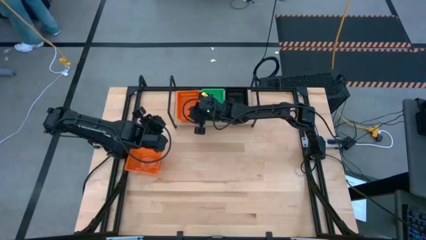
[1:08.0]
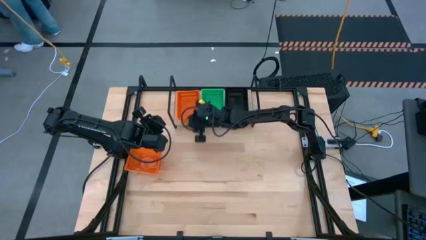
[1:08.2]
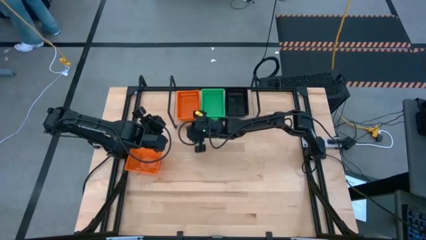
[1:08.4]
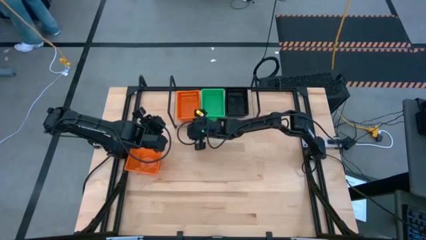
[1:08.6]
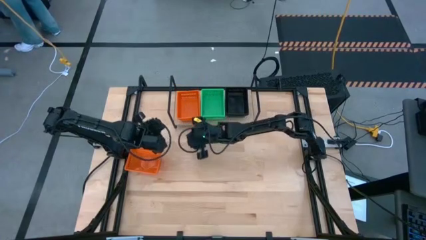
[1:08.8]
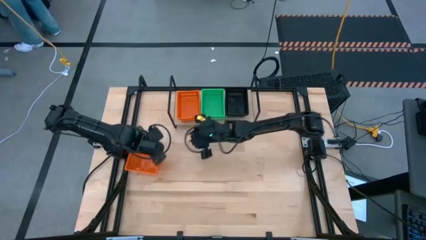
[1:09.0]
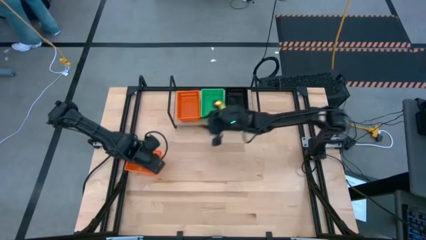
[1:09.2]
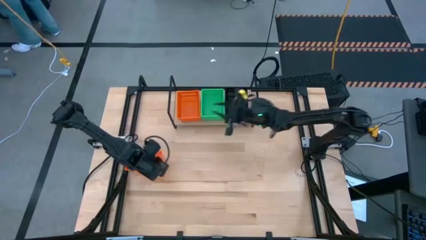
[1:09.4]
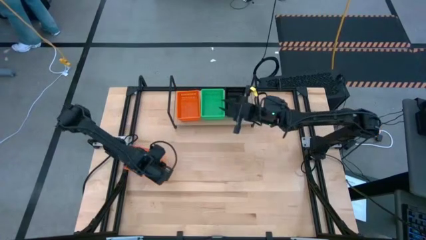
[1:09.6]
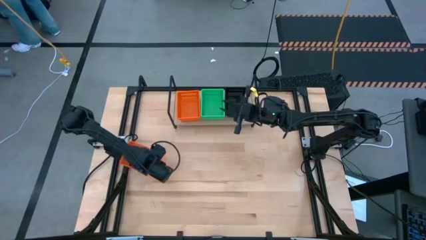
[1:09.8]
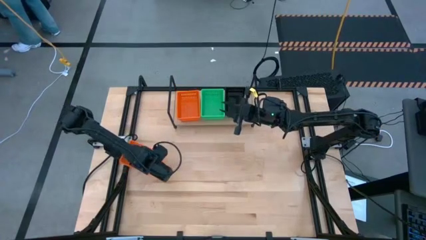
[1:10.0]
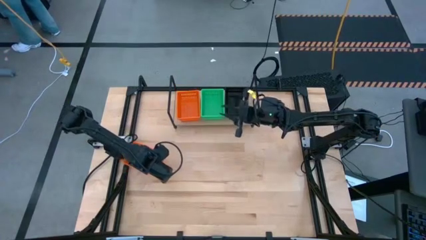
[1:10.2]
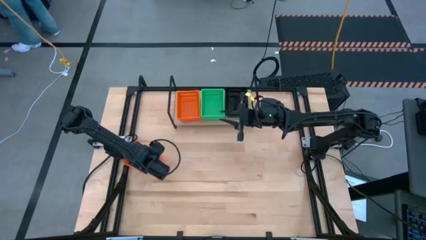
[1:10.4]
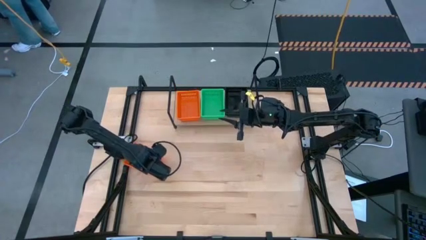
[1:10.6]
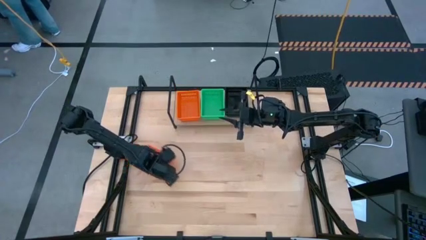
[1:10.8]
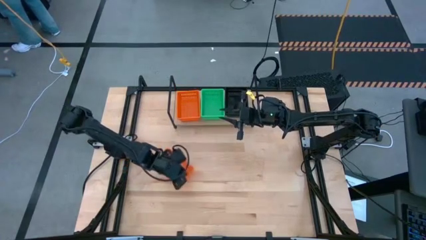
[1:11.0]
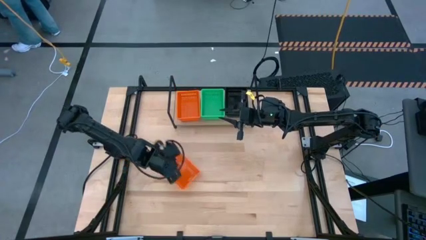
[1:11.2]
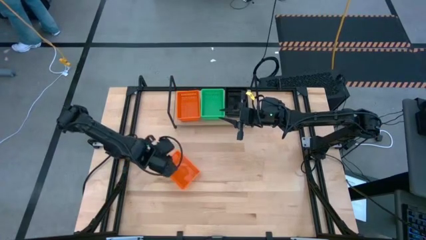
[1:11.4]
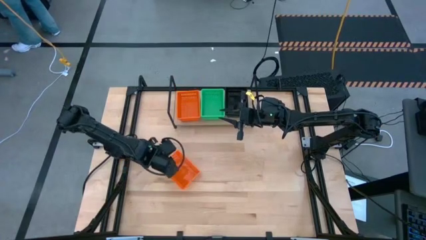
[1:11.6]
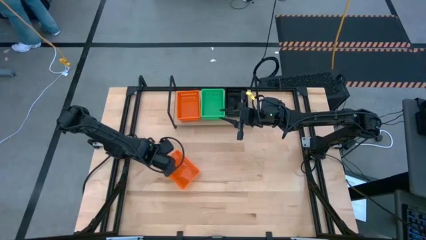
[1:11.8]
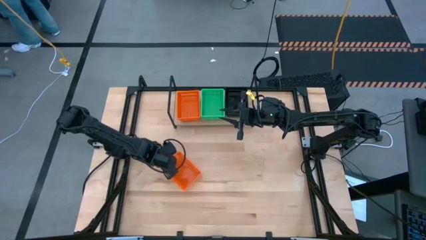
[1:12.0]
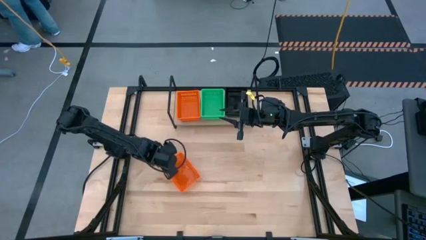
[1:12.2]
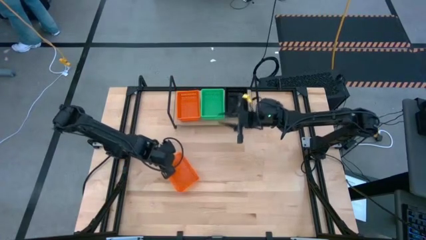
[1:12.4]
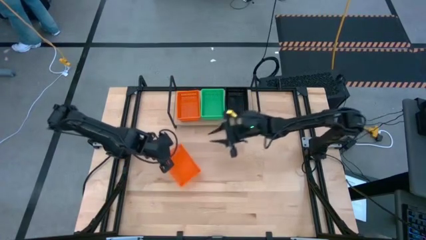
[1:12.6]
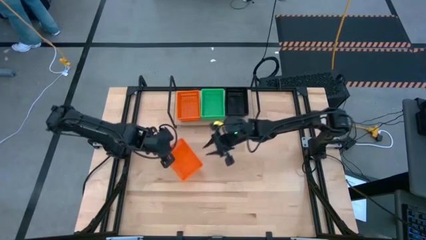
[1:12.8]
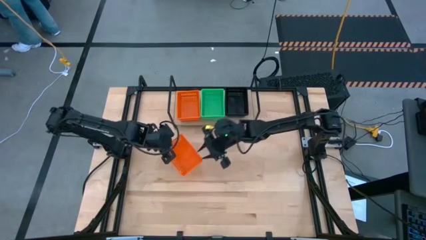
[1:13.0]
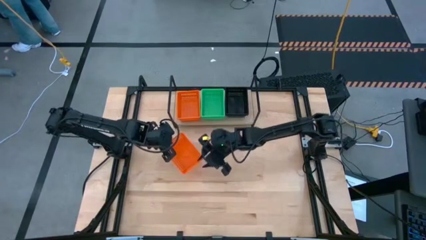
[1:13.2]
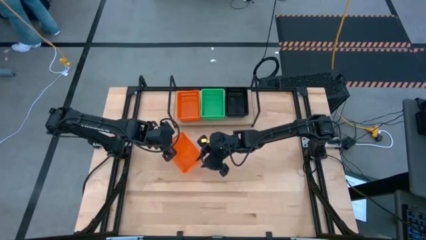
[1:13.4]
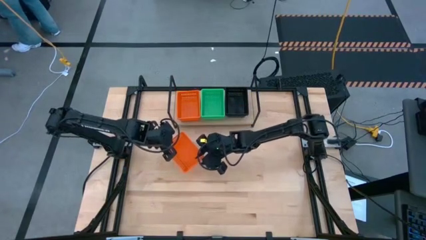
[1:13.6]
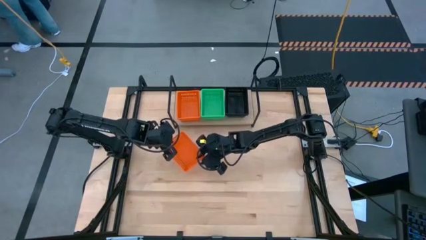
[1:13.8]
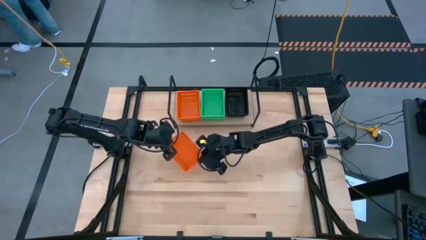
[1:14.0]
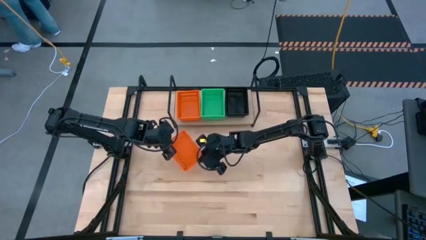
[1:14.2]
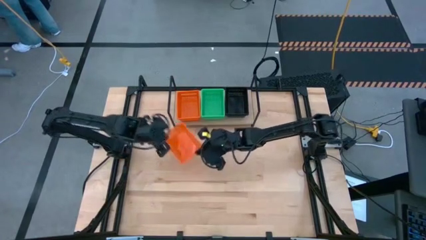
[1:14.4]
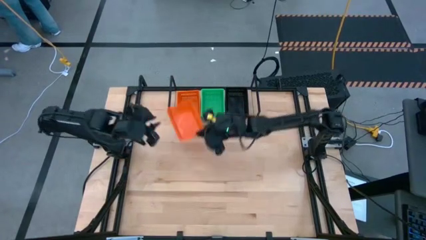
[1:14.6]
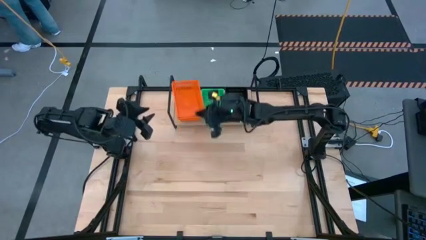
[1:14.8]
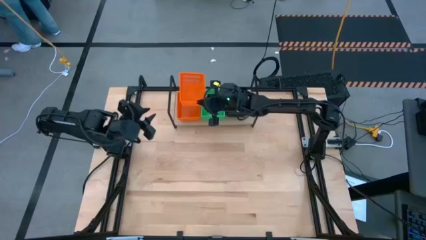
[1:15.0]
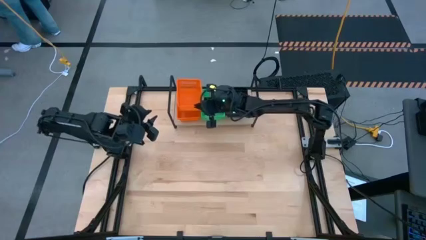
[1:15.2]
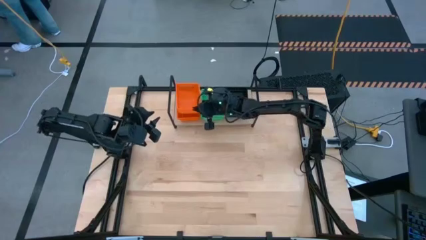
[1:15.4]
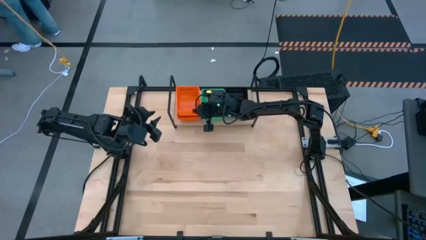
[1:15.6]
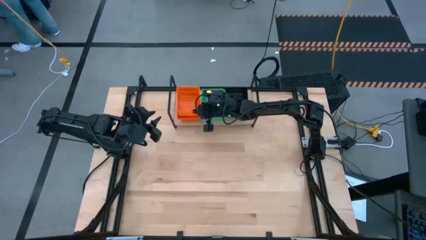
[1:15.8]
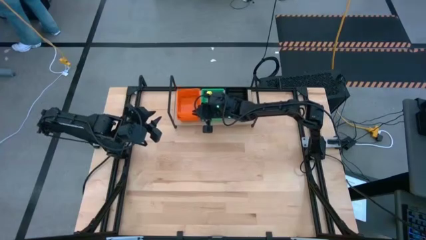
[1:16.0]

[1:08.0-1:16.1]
Task: Stack baskets on shelf by color
Stack the orange bin on the orange bins on the shelf

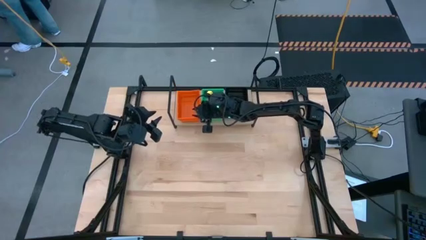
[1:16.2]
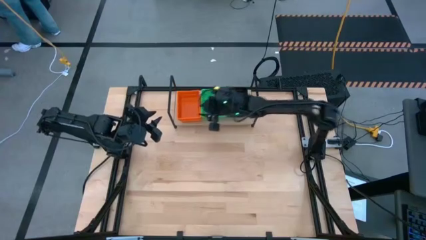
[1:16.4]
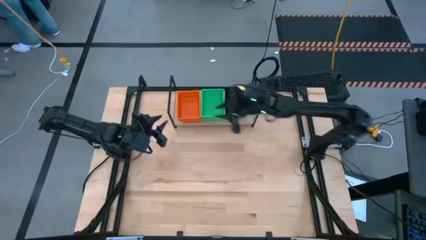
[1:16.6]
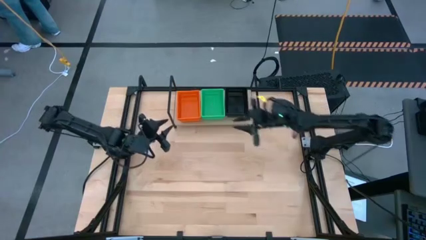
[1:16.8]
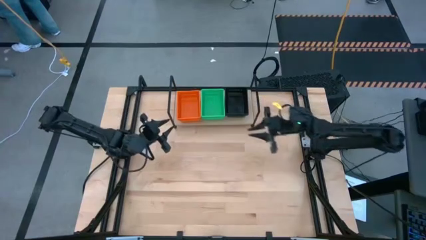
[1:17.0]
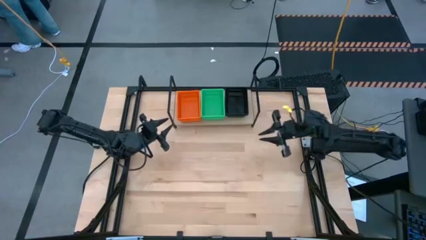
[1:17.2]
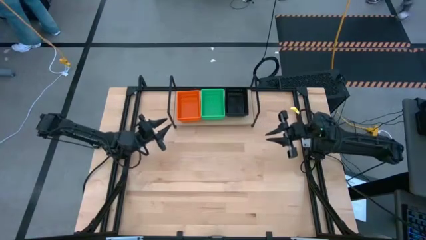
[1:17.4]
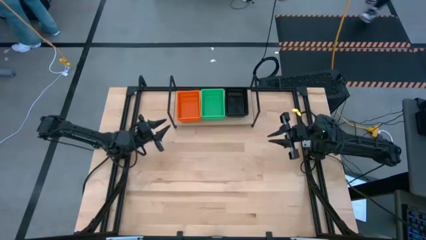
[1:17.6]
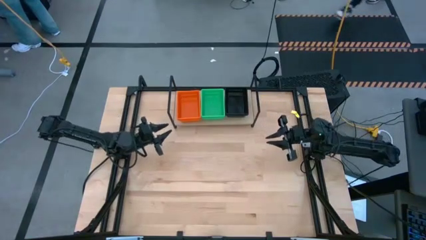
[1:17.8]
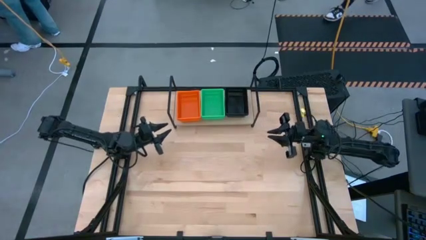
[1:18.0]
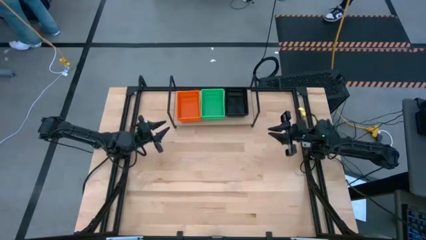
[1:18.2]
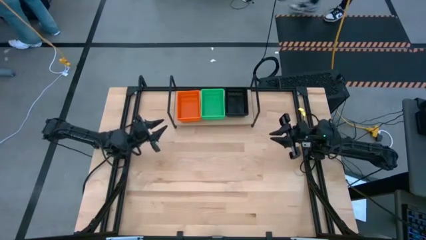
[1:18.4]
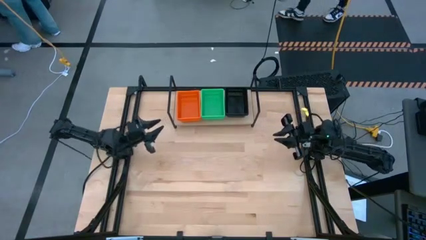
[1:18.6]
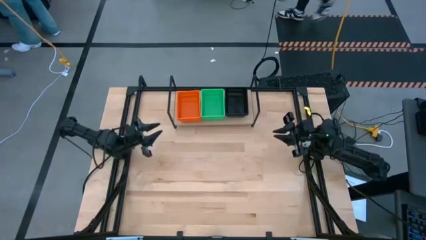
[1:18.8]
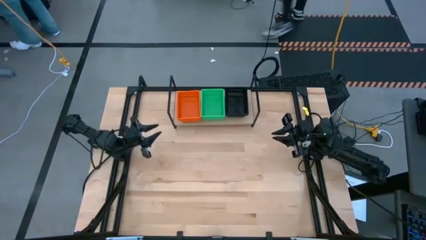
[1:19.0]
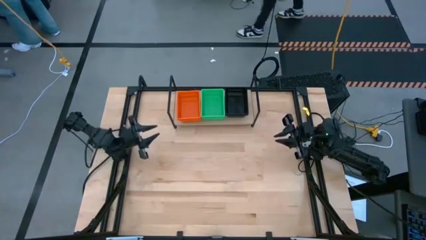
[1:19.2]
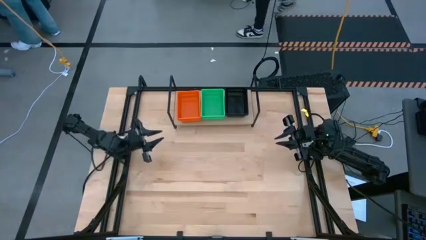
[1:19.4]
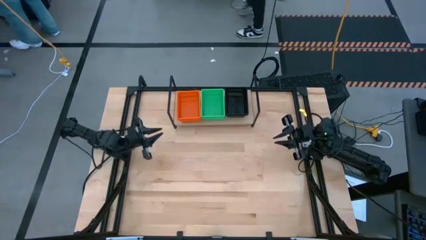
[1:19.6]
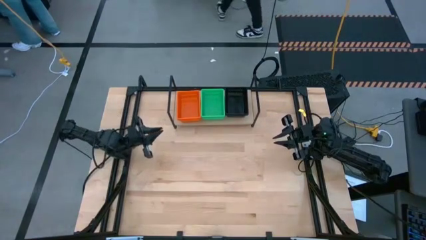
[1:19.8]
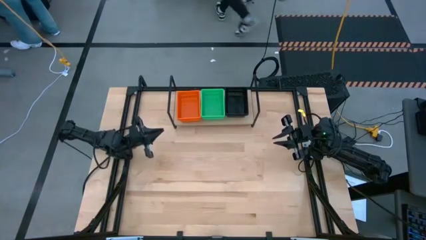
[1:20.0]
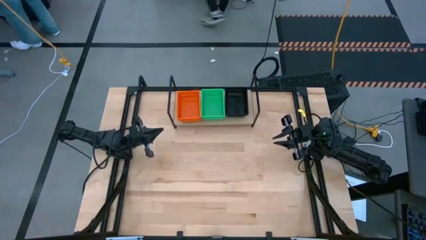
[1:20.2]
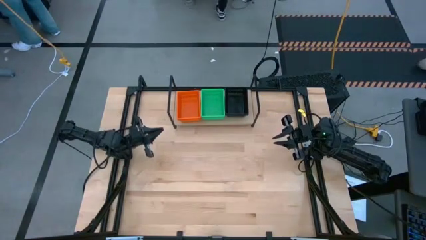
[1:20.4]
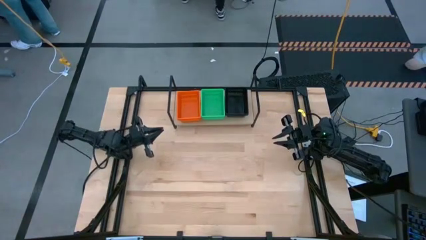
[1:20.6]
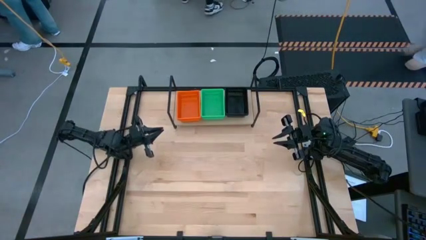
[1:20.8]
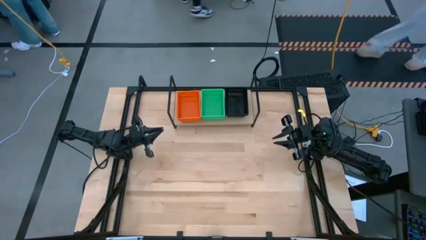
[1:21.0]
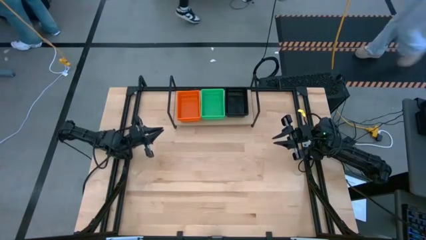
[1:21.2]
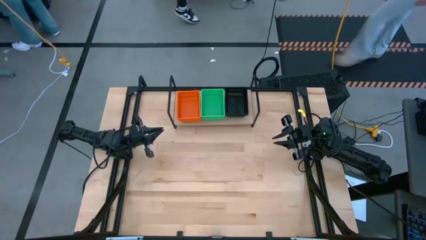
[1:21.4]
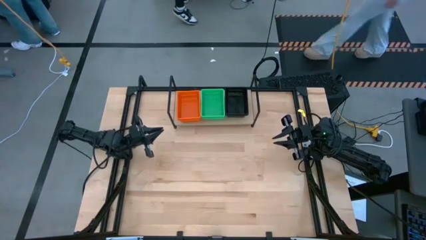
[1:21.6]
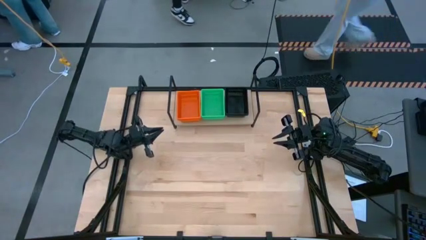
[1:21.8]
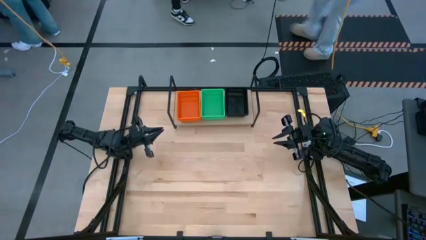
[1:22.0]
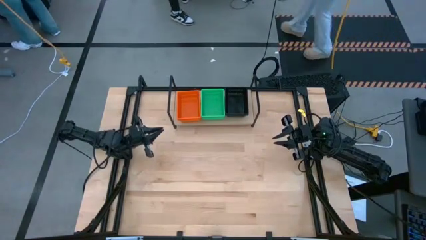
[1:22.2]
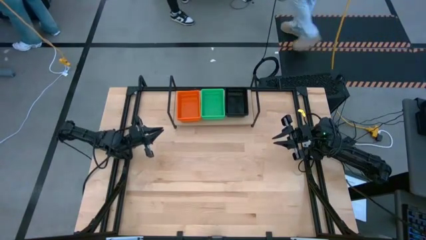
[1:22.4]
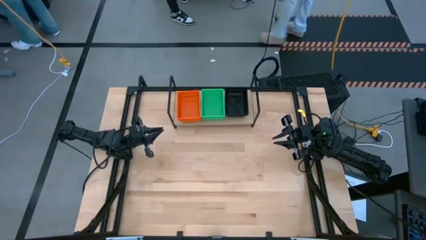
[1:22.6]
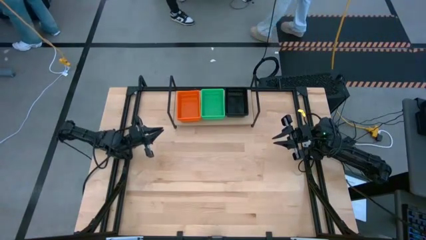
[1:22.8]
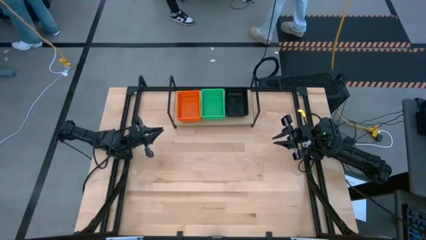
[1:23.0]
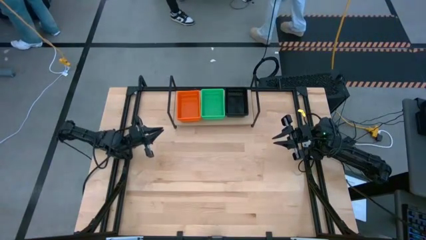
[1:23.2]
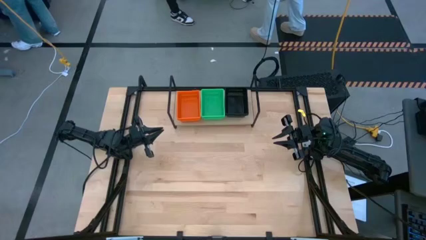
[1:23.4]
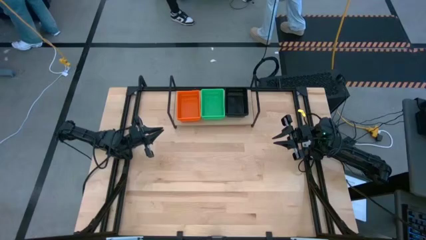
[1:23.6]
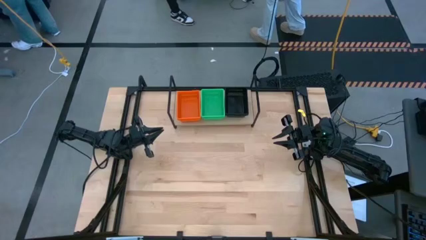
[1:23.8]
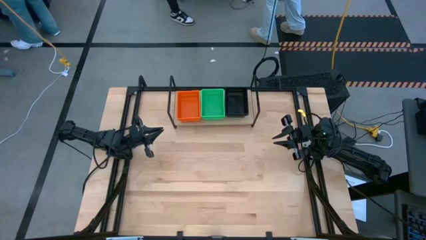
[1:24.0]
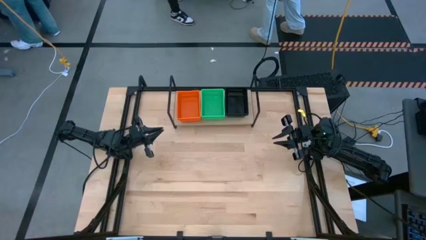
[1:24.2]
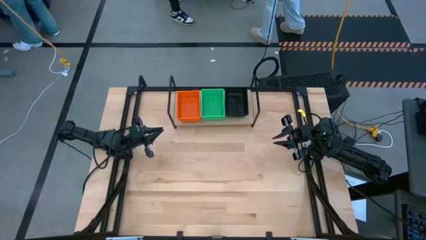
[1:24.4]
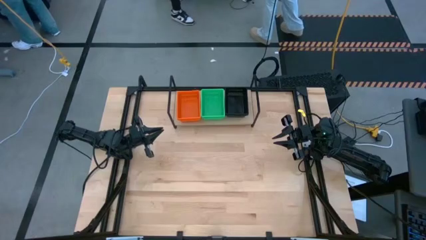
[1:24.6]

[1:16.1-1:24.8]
Return to Home Position
